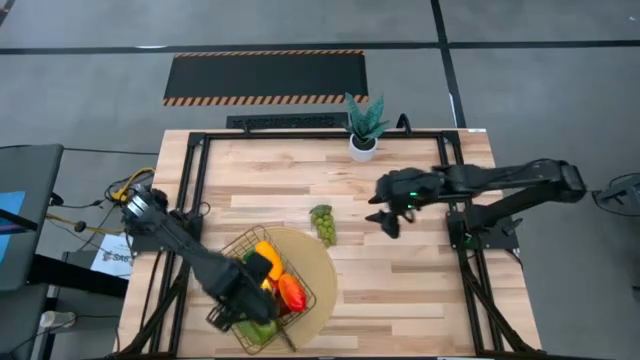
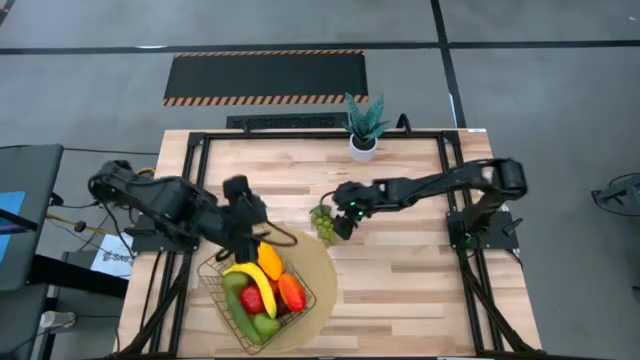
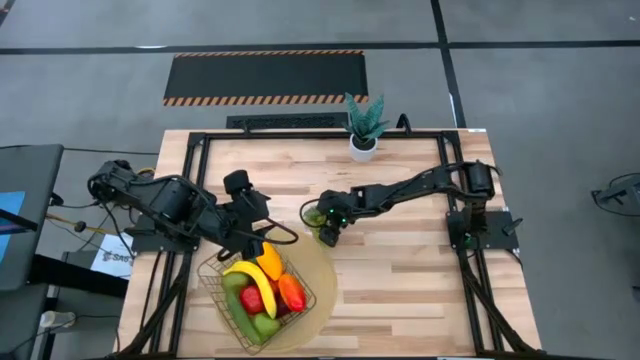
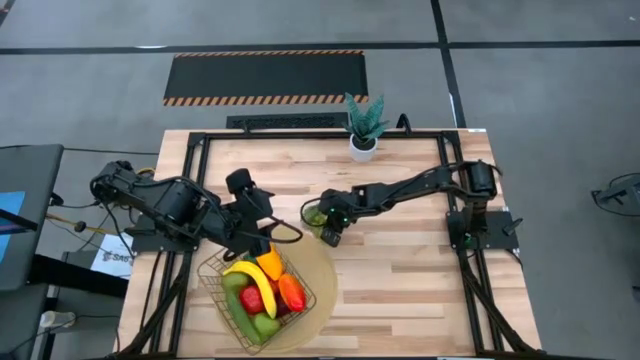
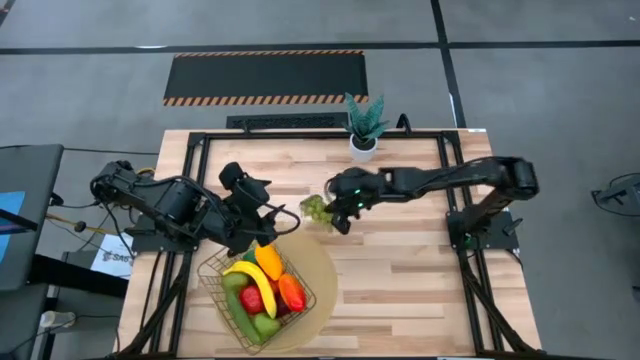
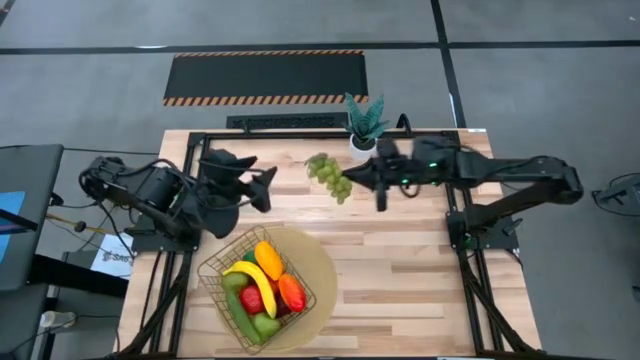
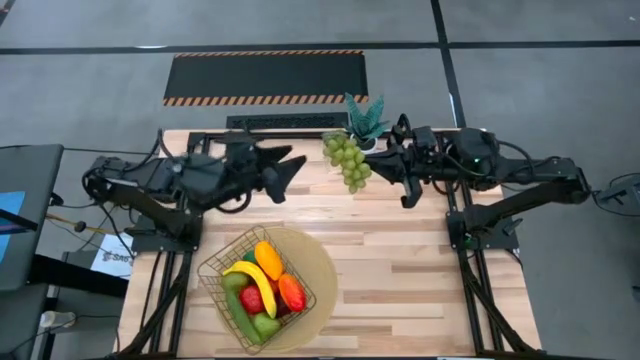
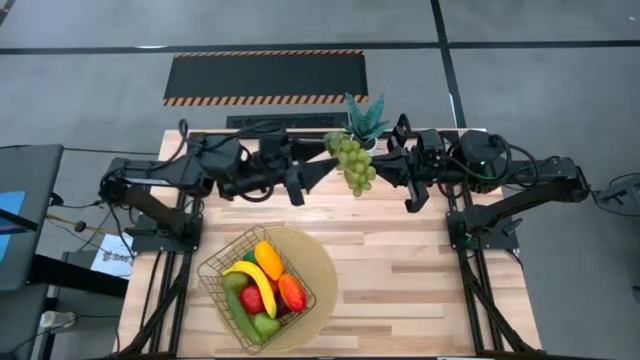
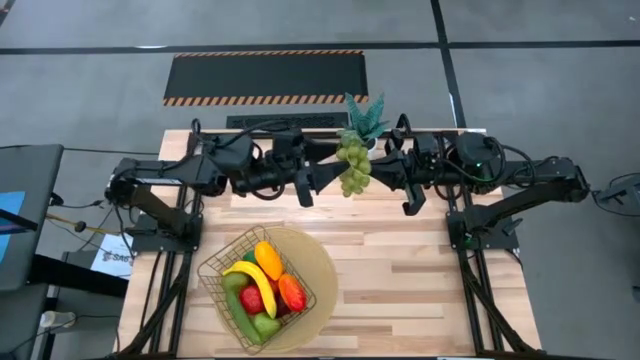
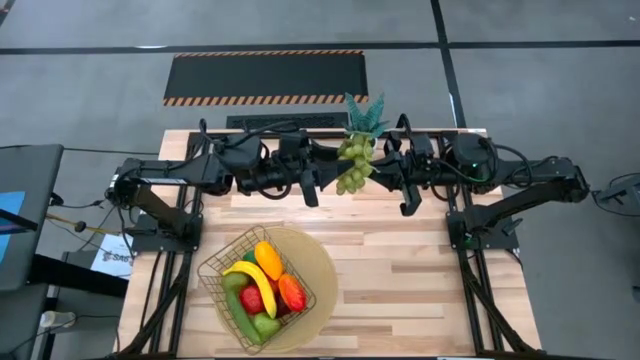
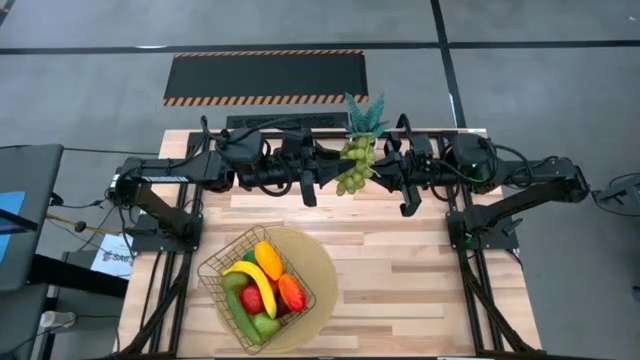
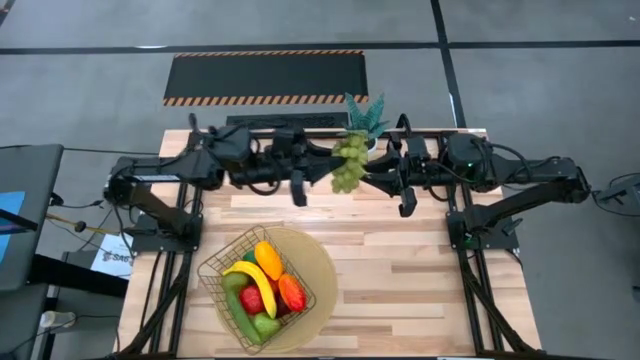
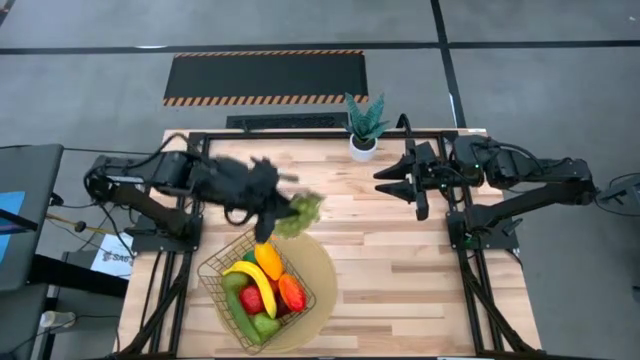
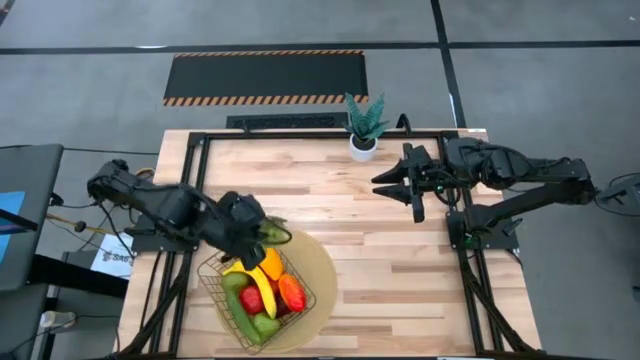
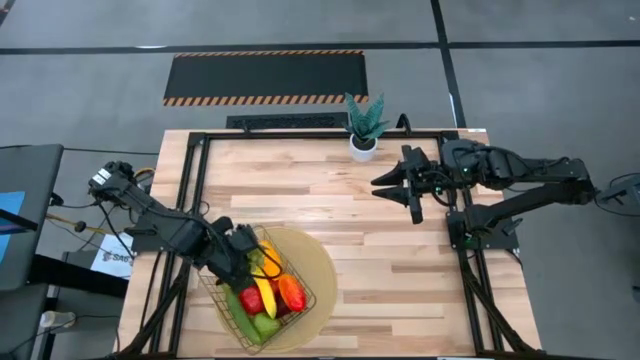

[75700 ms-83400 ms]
Task: Build produce basket
Put green grapes into the mesh basket

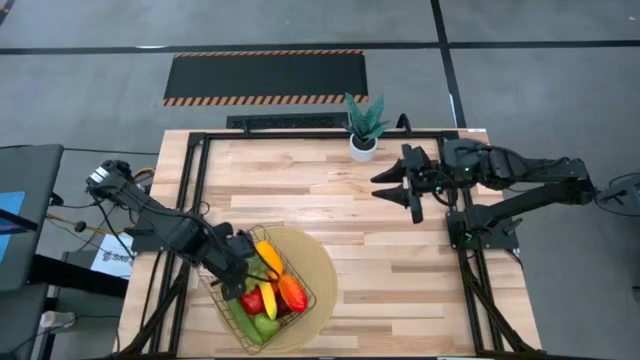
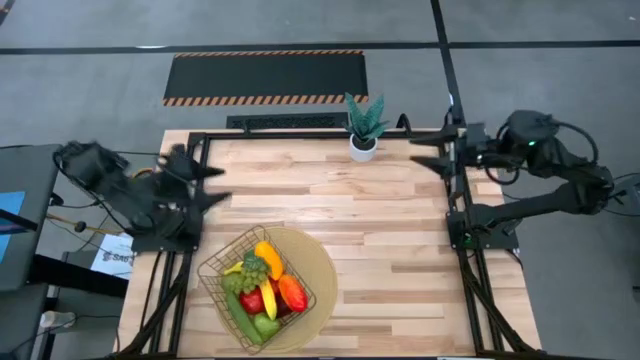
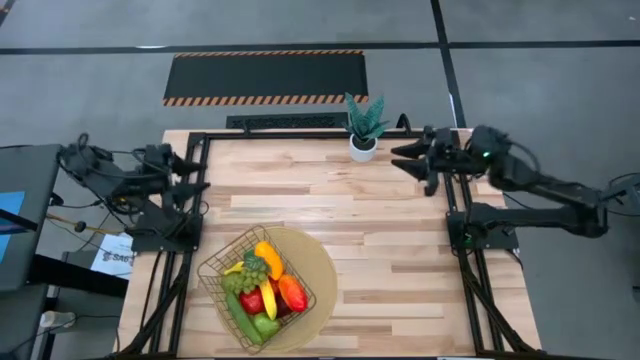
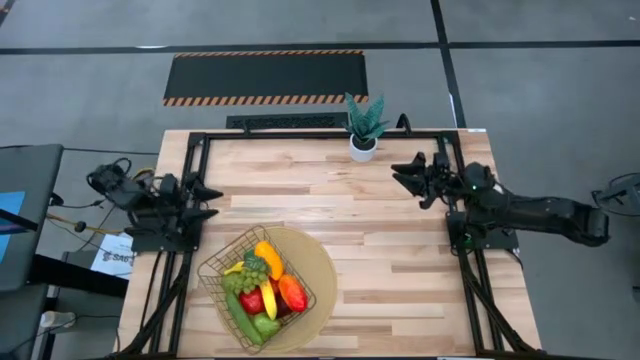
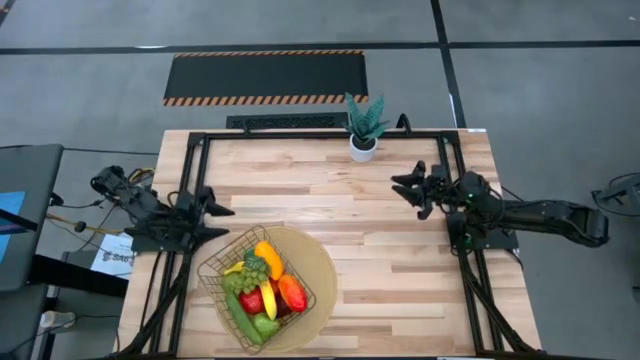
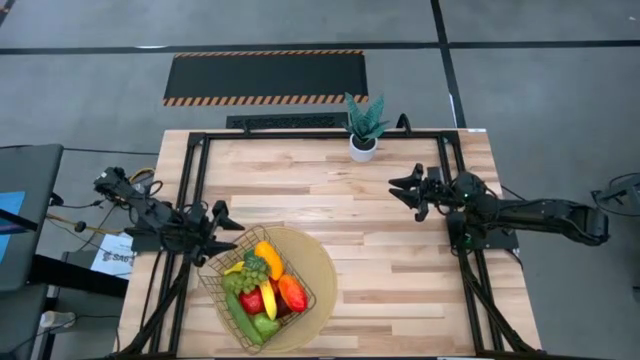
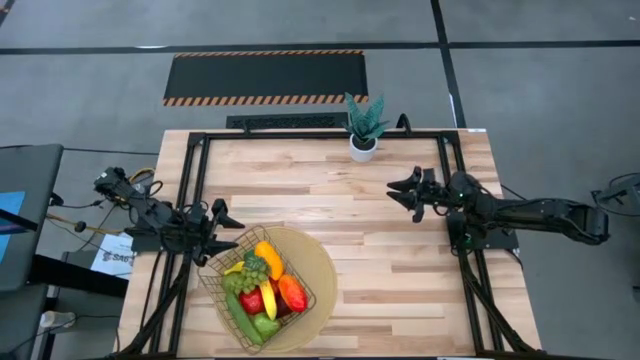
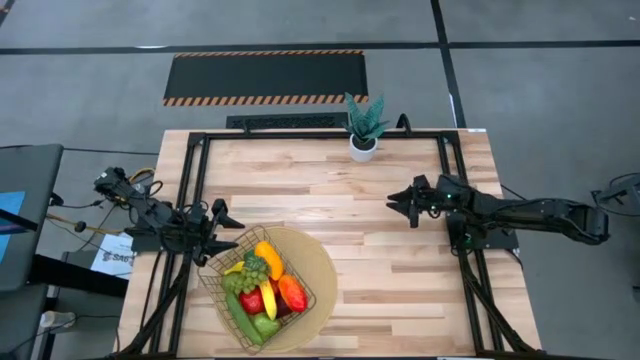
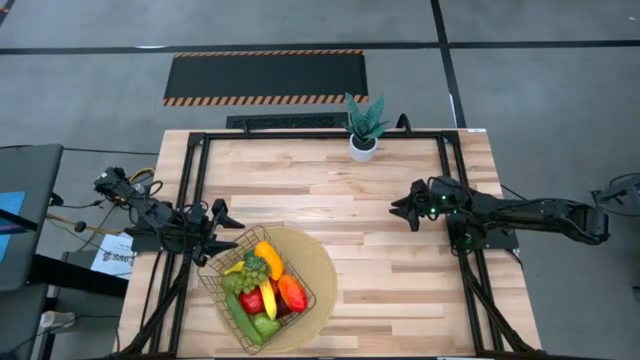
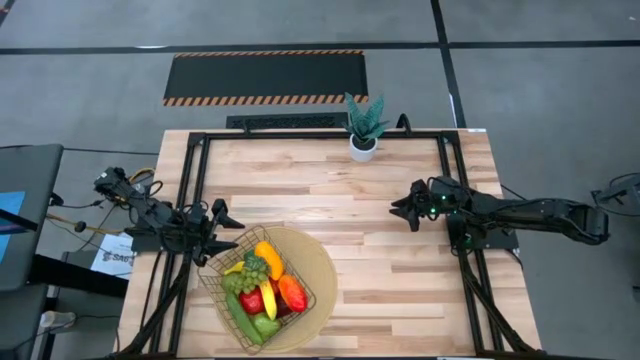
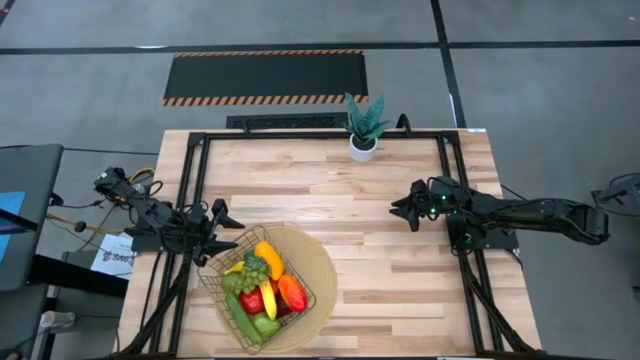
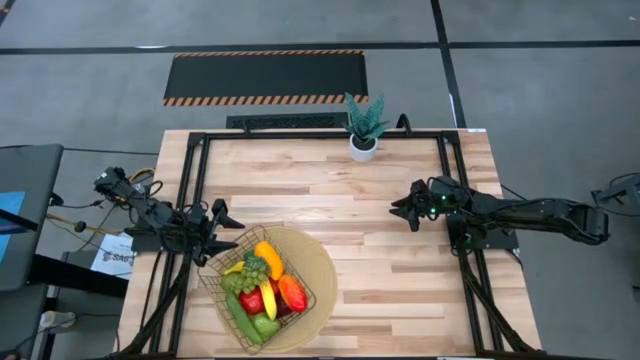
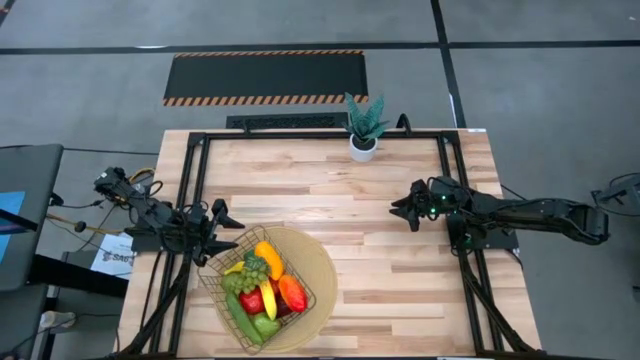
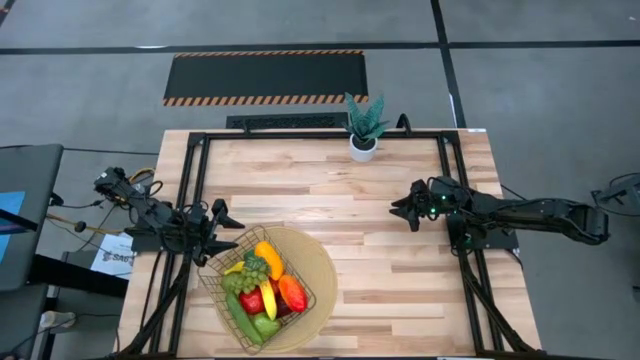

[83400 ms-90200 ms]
Return to Home position

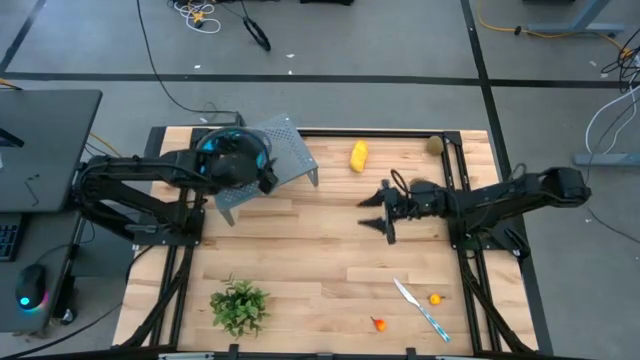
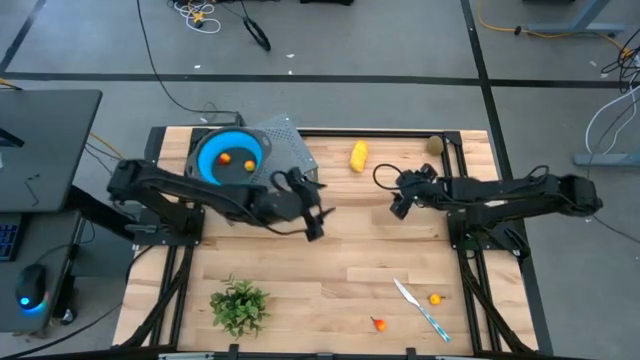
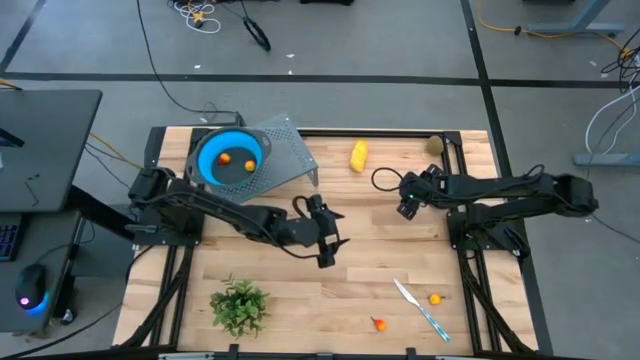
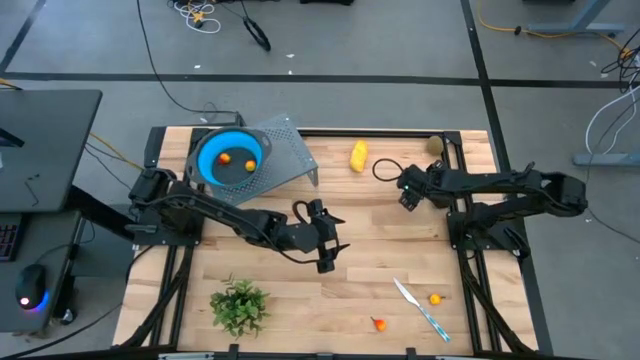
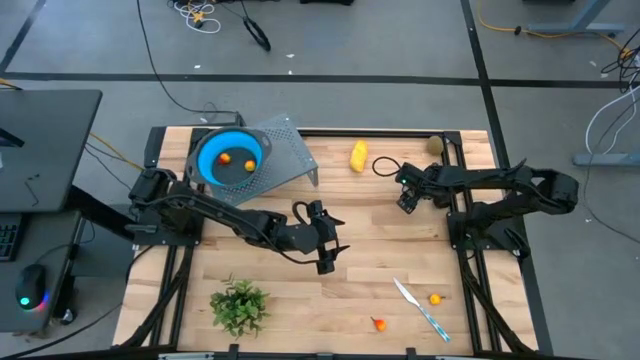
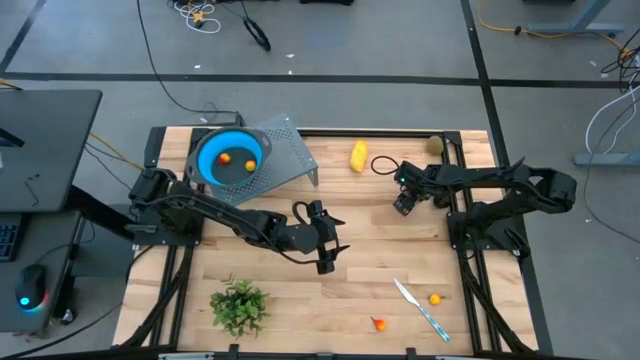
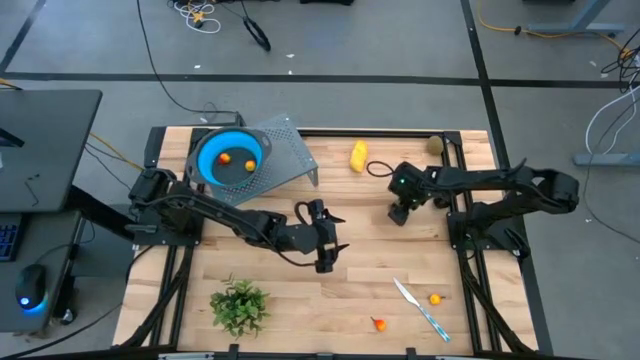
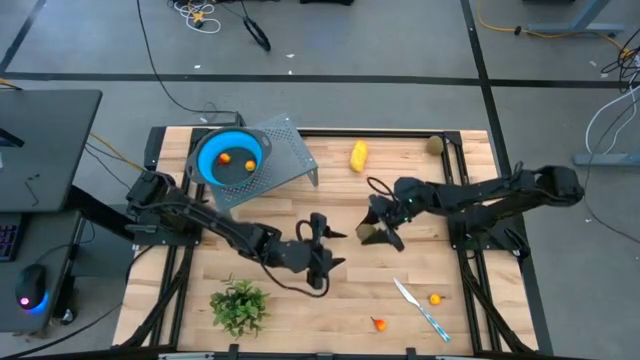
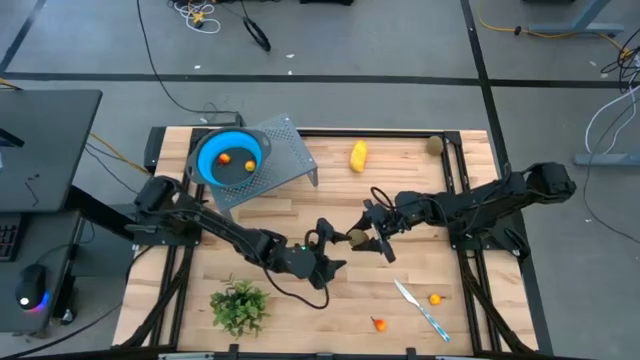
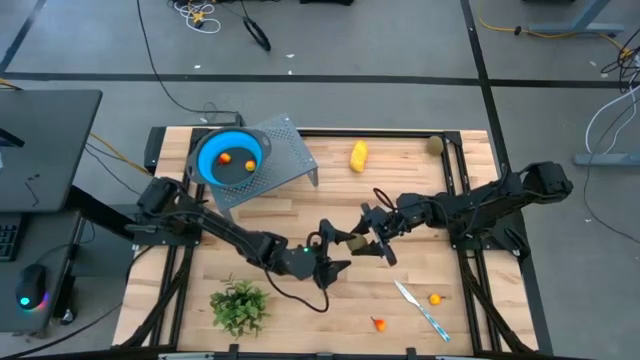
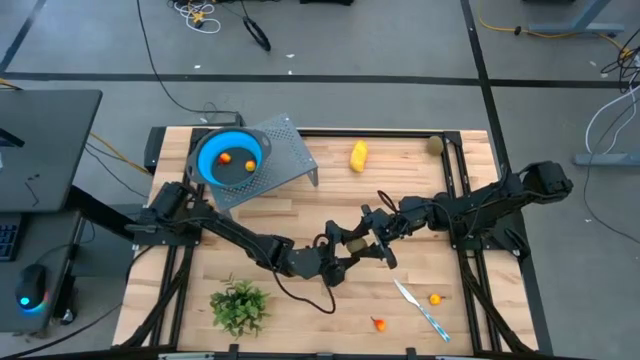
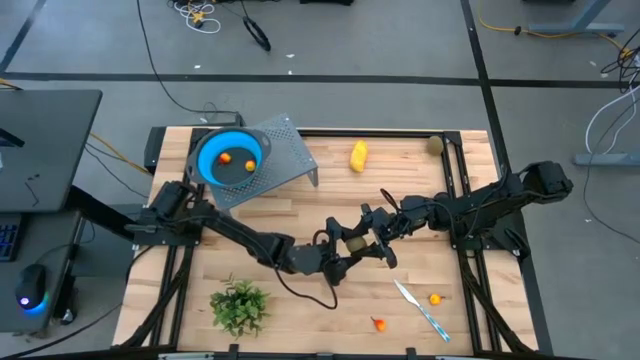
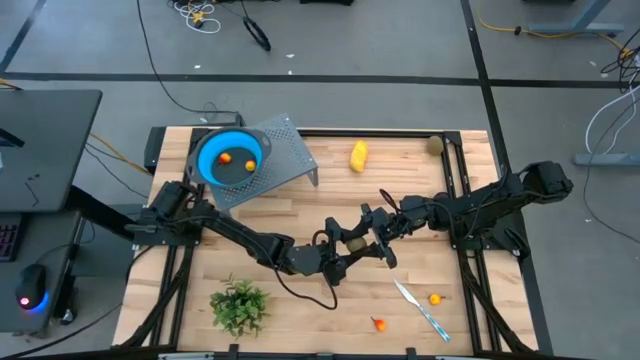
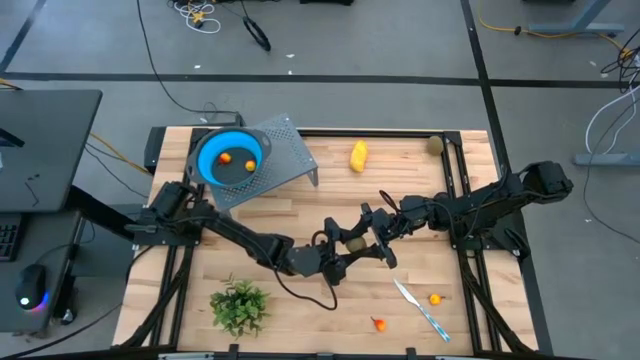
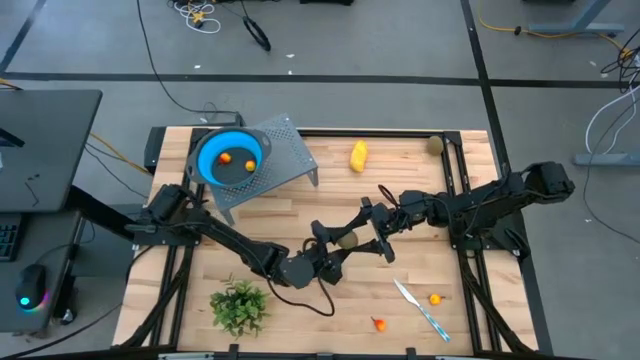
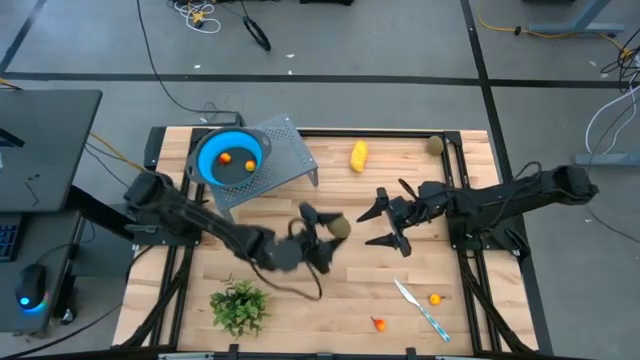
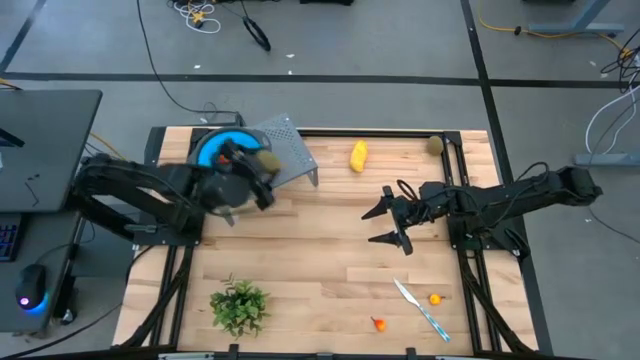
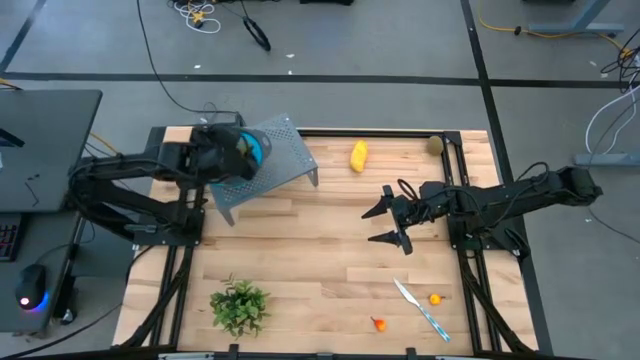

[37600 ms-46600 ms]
Task: Pick & Place Fruit
Put the brown kiwi into the blue strainer bowl on the shelf
